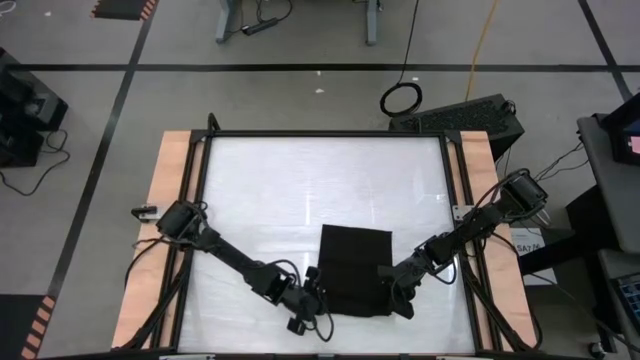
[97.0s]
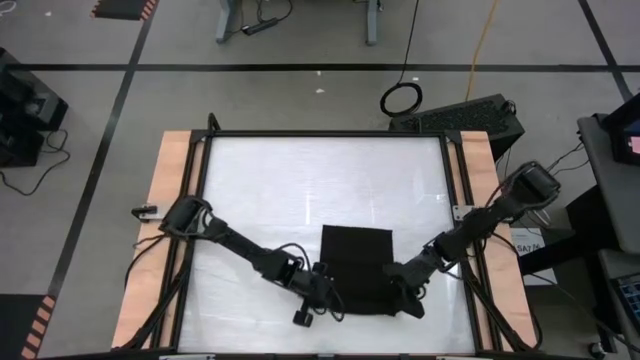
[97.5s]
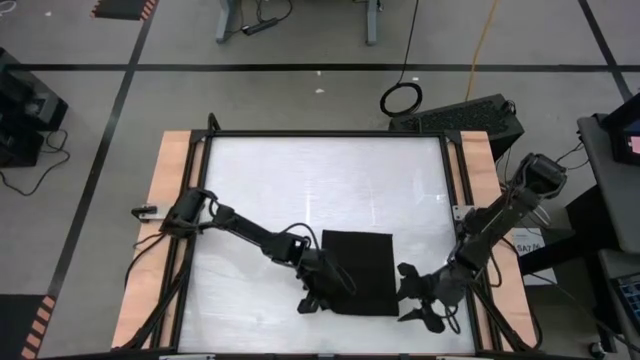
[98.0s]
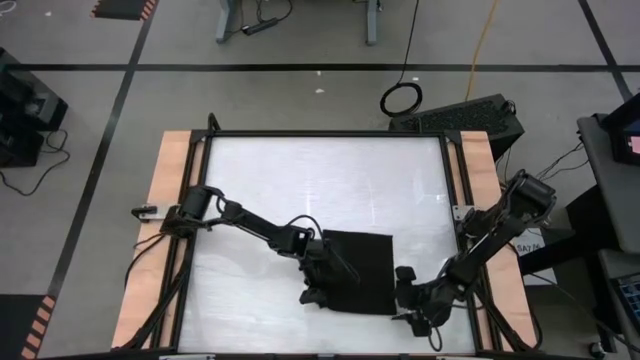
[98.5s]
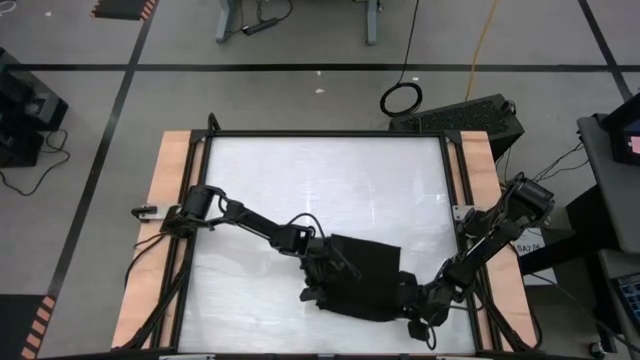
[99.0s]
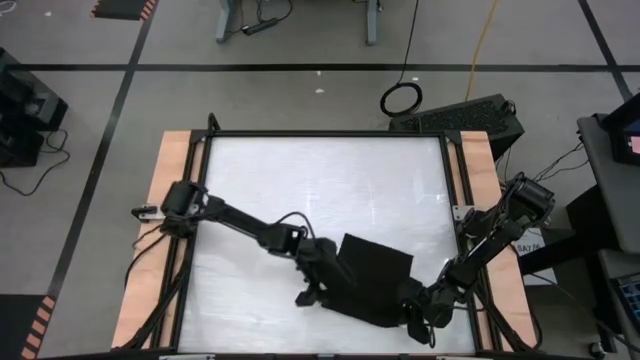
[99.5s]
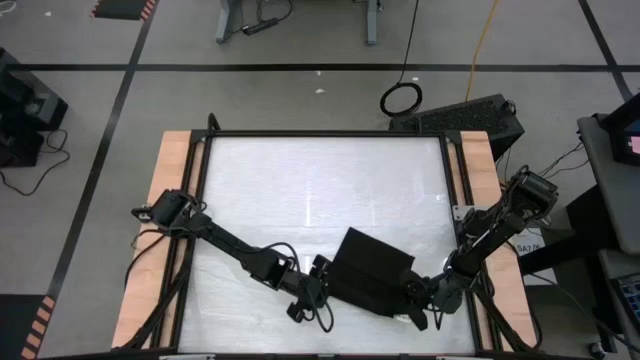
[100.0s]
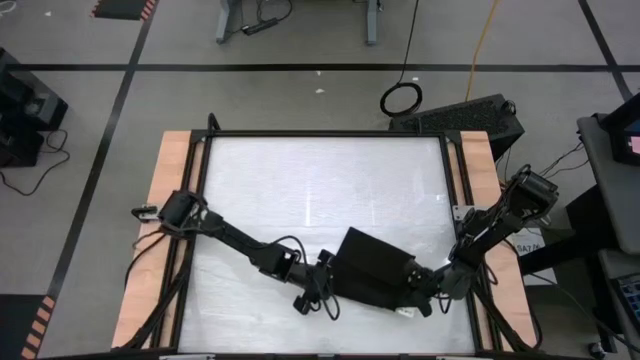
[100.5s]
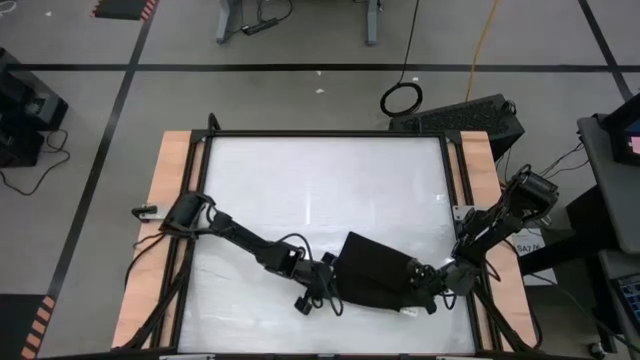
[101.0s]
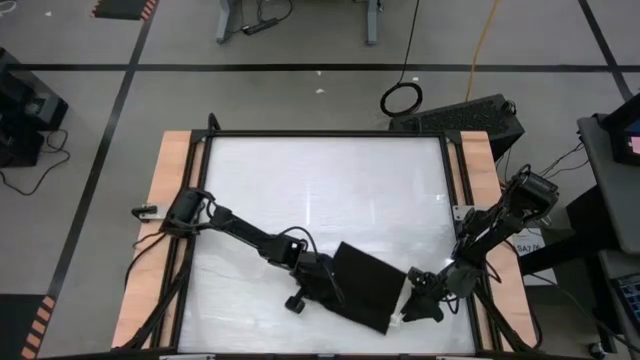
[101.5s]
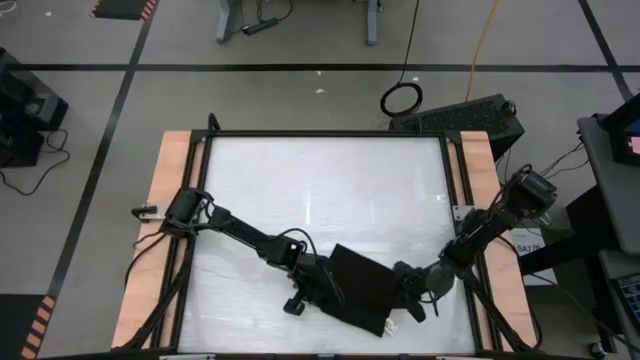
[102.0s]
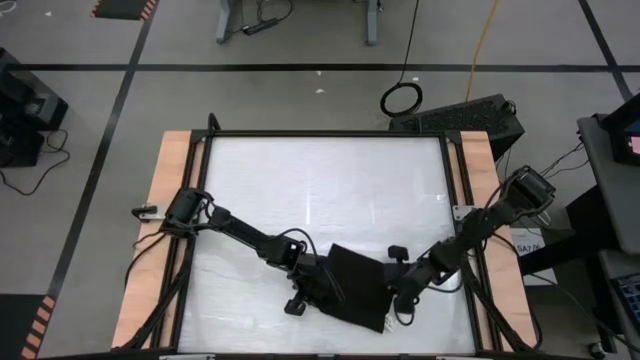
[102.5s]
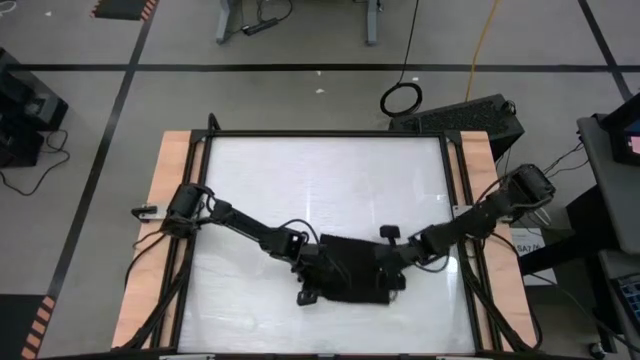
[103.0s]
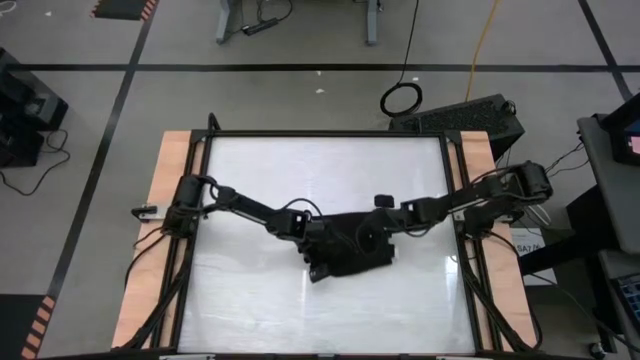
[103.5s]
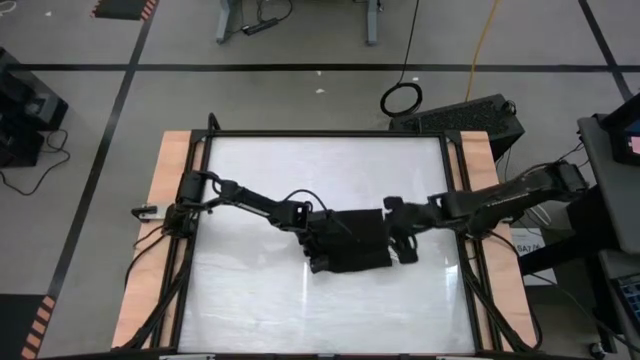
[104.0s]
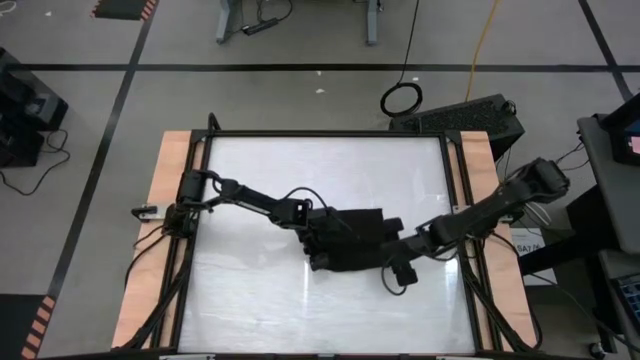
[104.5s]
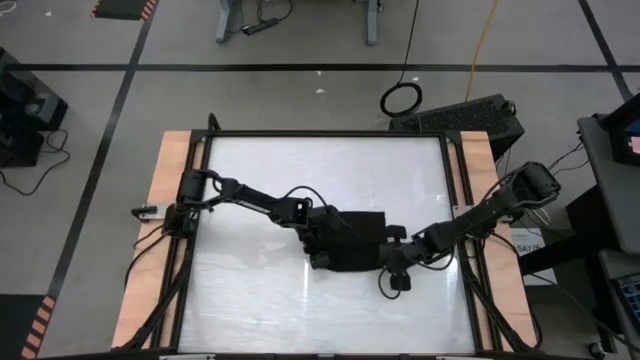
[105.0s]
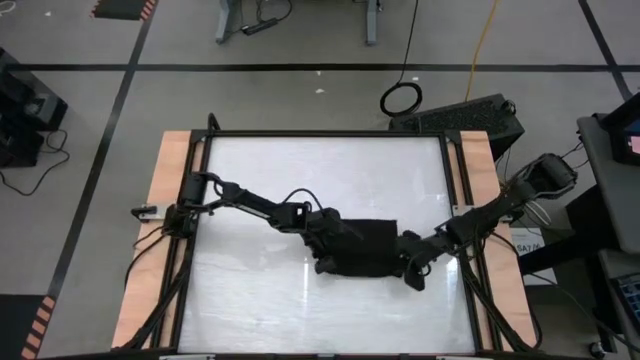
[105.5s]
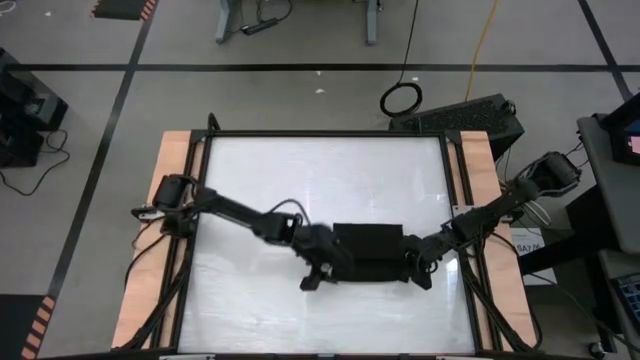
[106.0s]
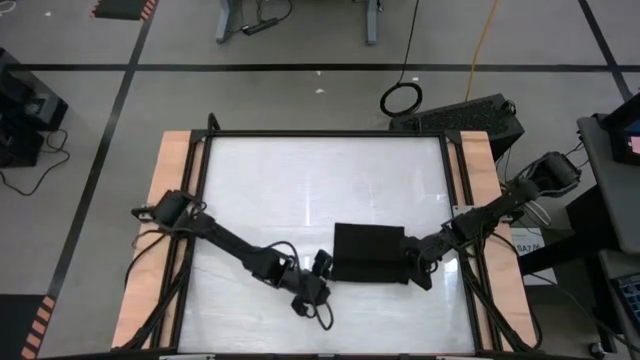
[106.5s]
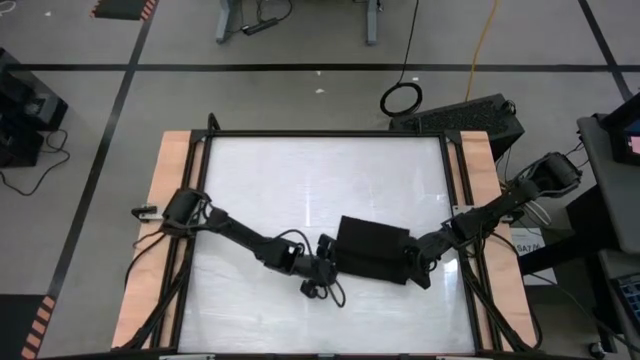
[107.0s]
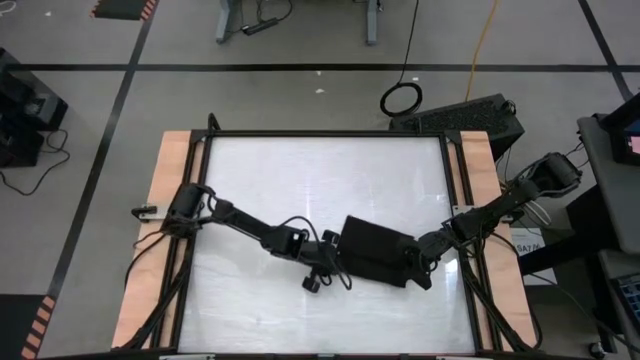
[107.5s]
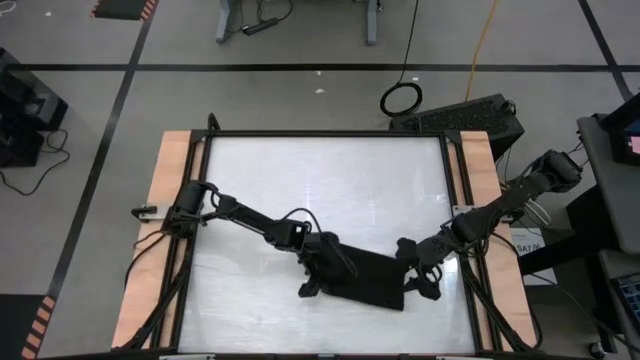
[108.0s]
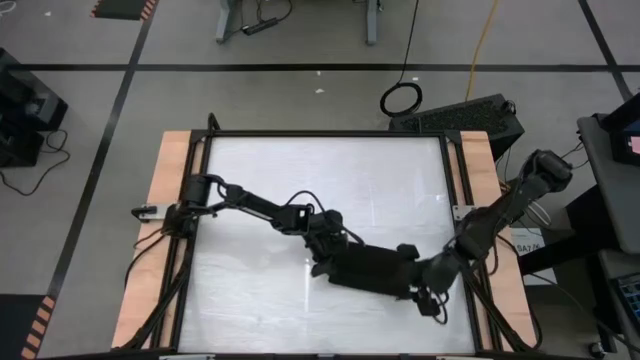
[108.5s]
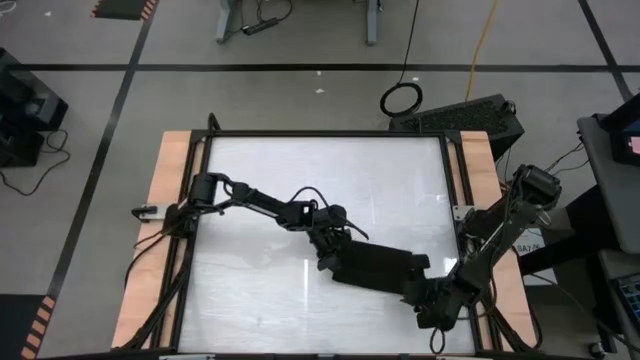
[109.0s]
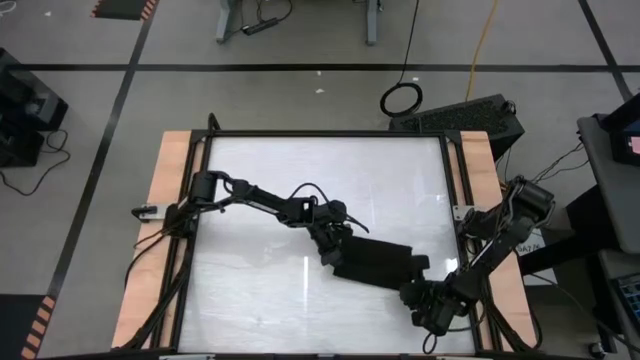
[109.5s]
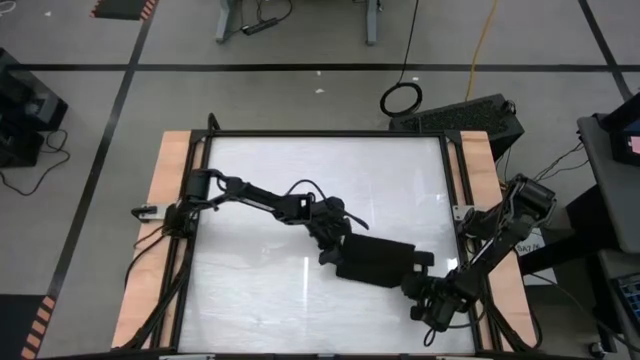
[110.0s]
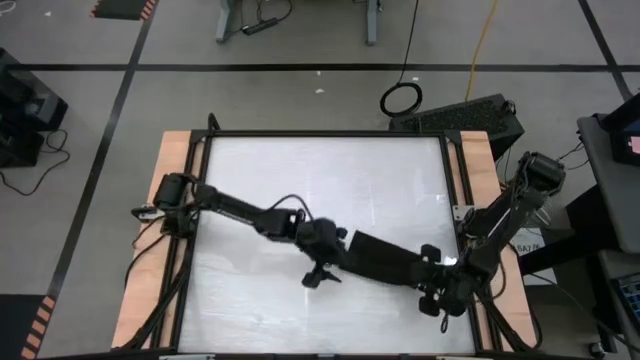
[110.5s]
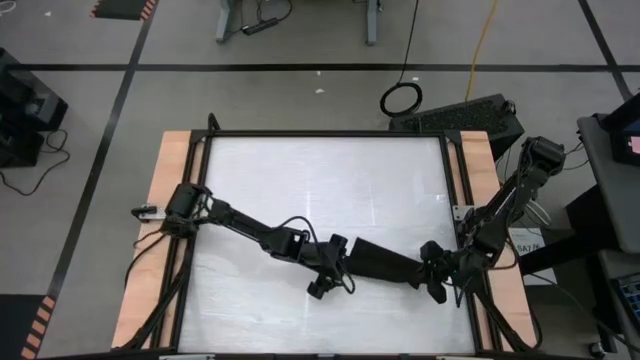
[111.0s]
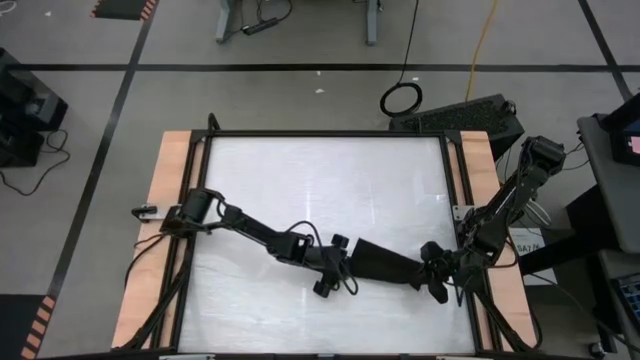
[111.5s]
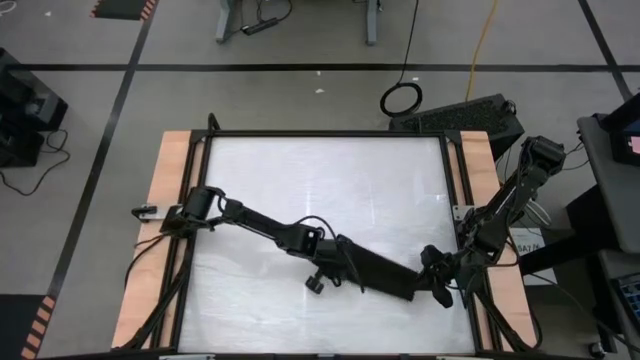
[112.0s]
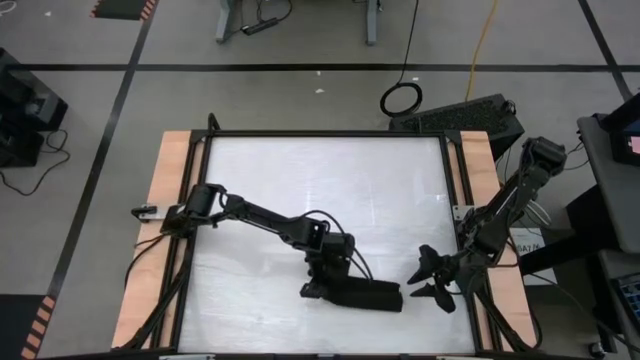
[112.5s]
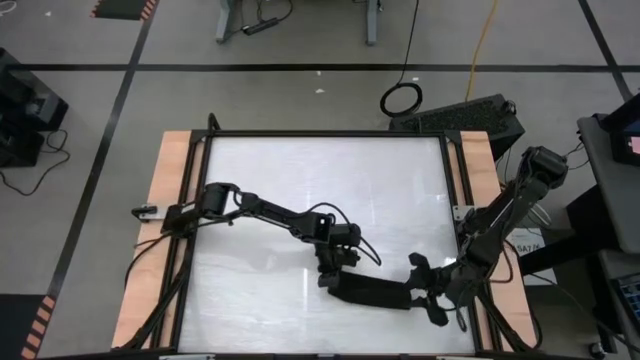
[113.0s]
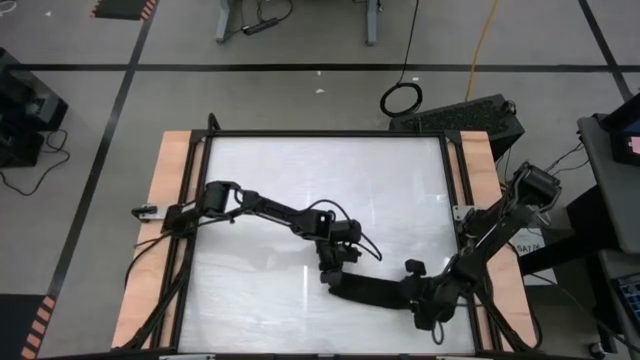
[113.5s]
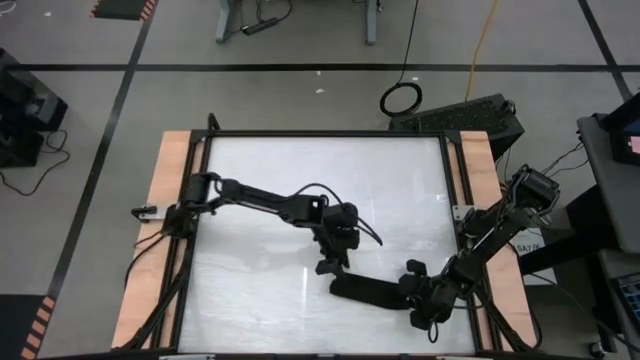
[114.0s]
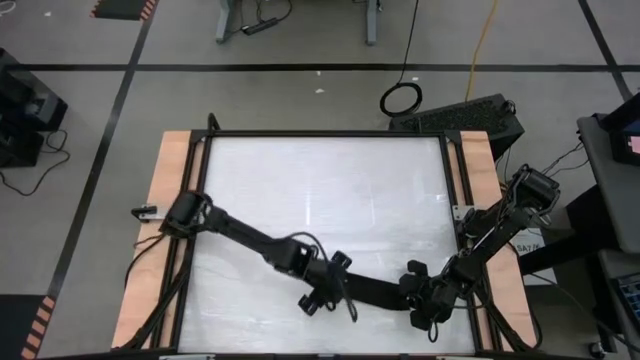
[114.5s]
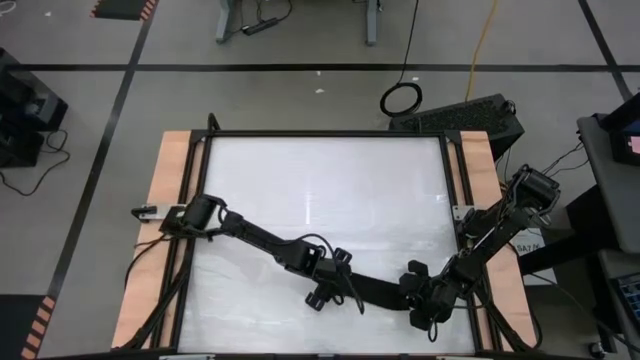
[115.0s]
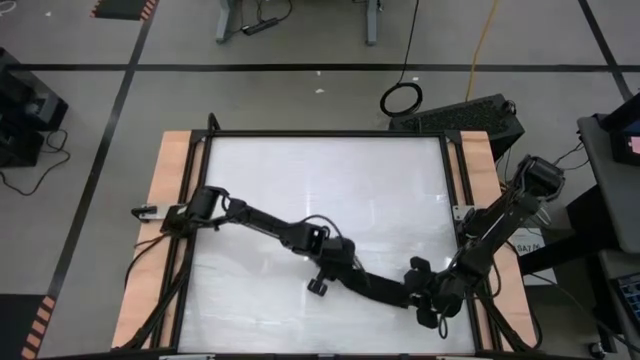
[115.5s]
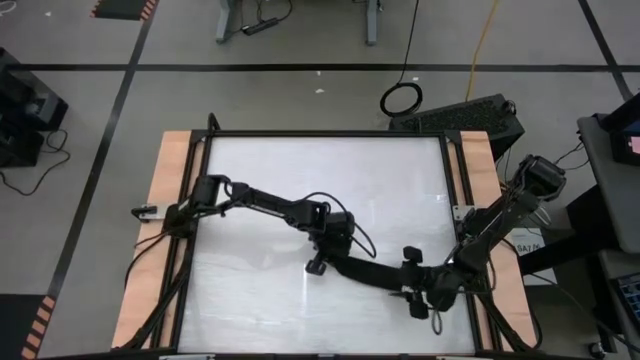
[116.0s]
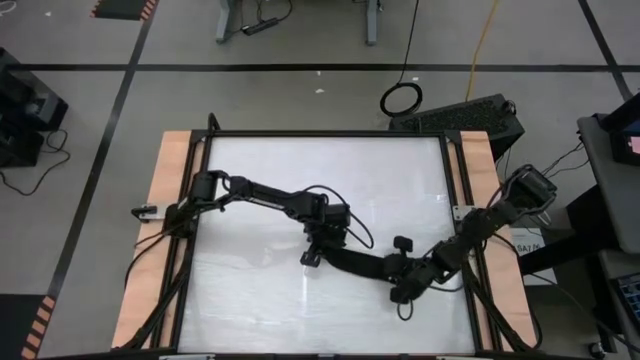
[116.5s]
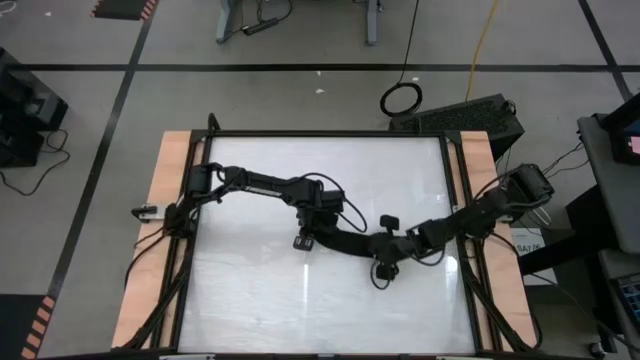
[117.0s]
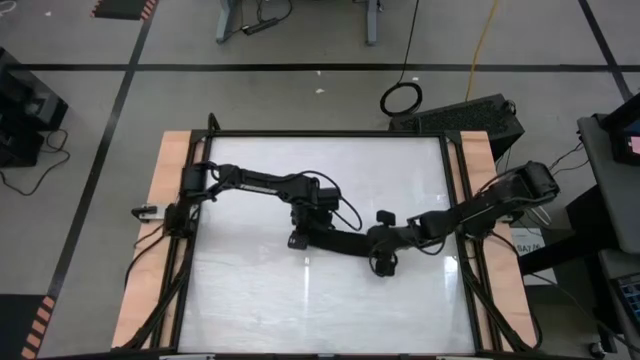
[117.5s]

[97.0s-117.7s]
Task: Roll towel
Roll the towel
